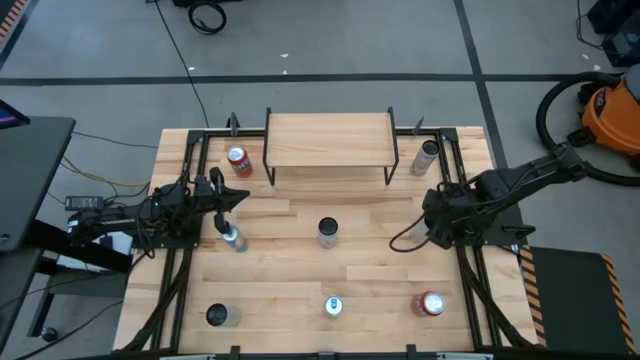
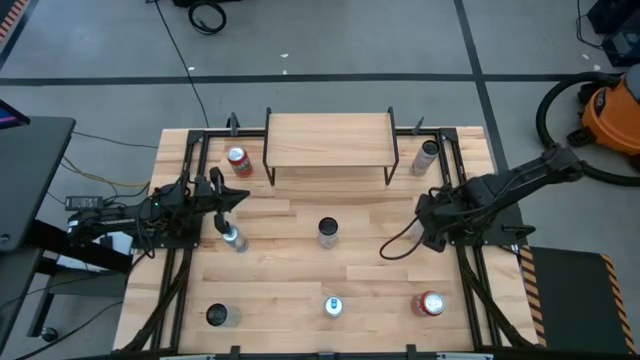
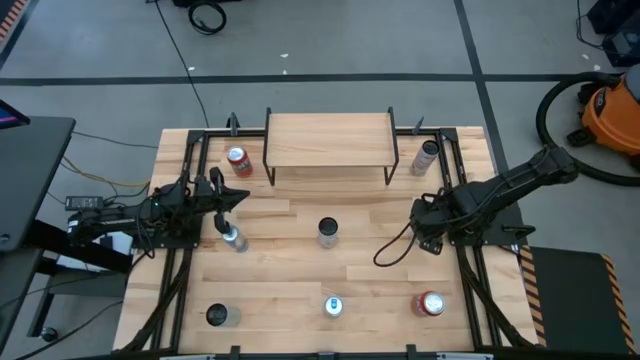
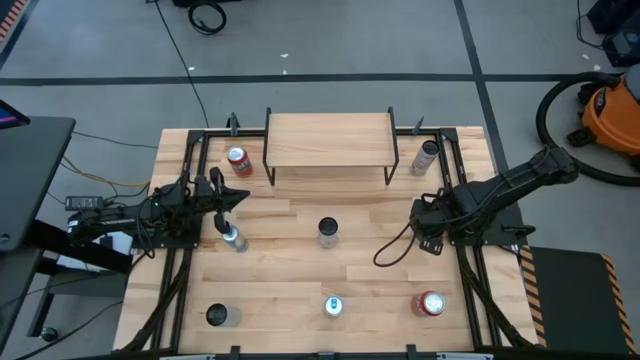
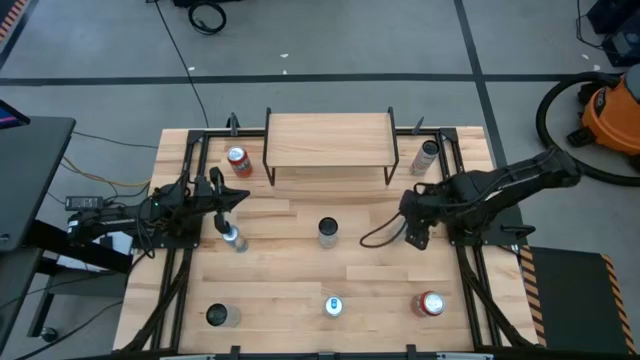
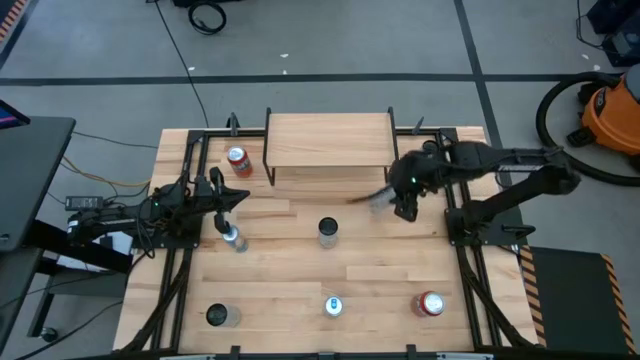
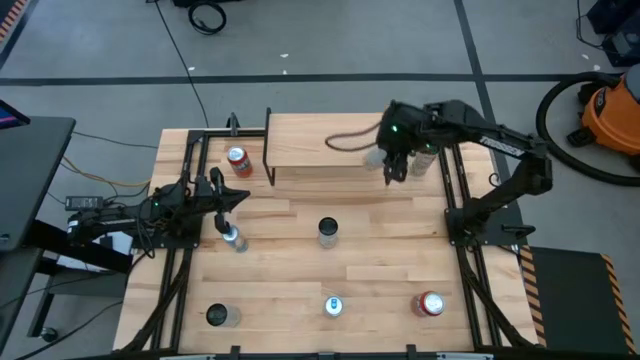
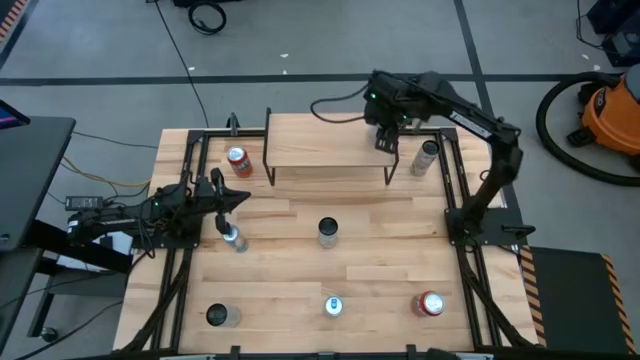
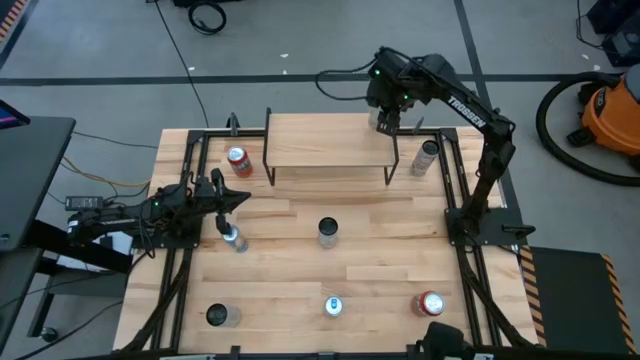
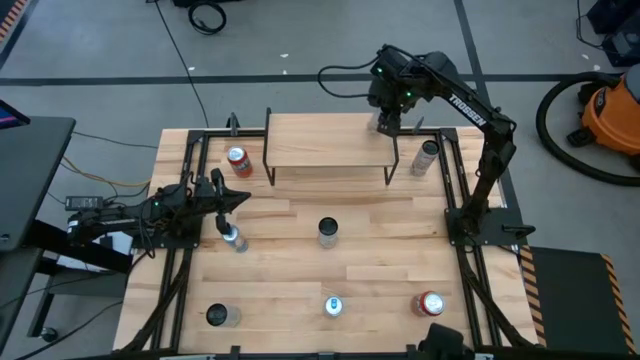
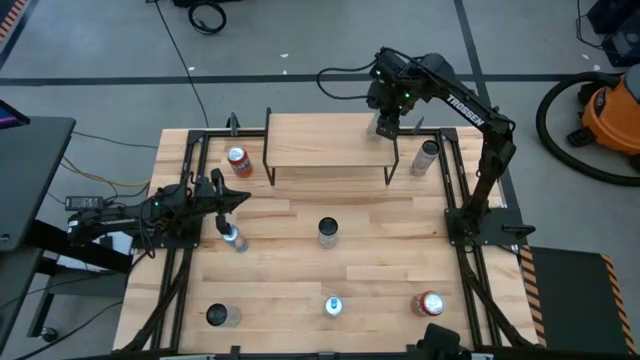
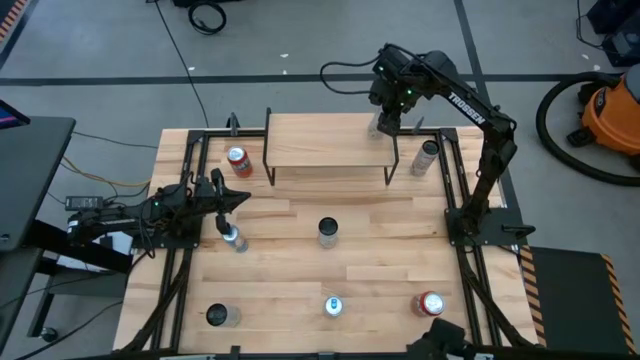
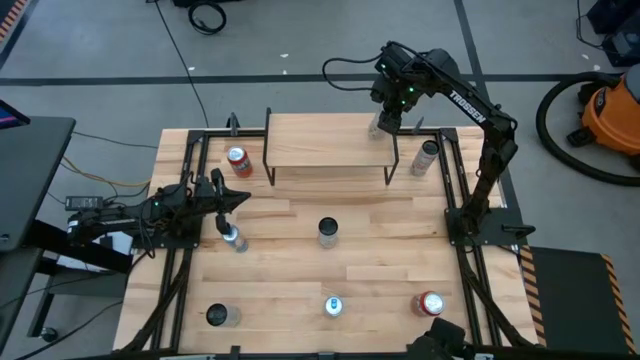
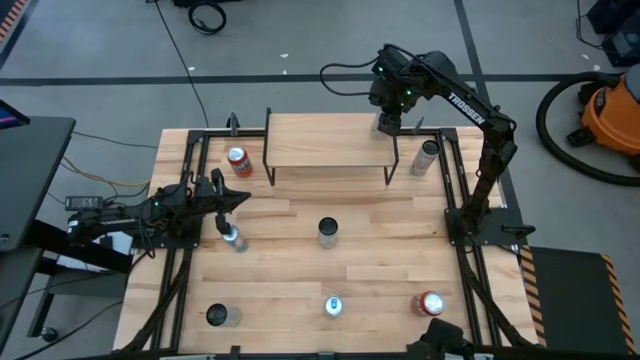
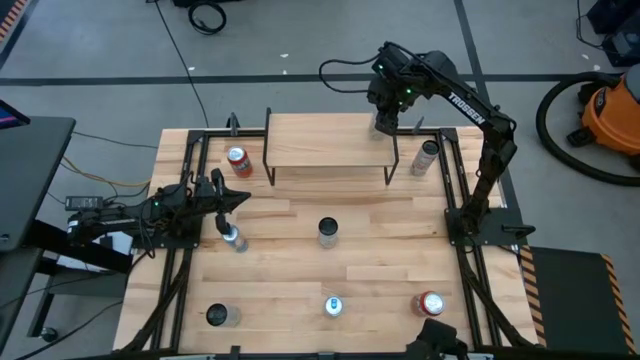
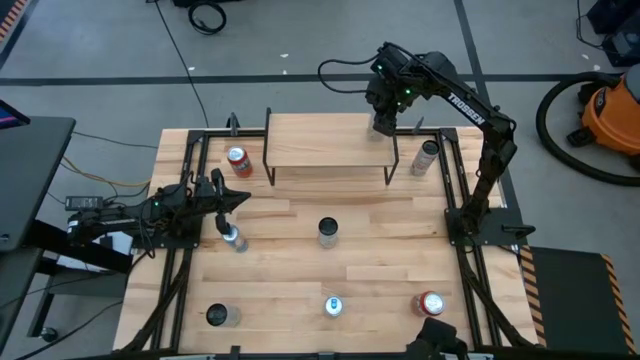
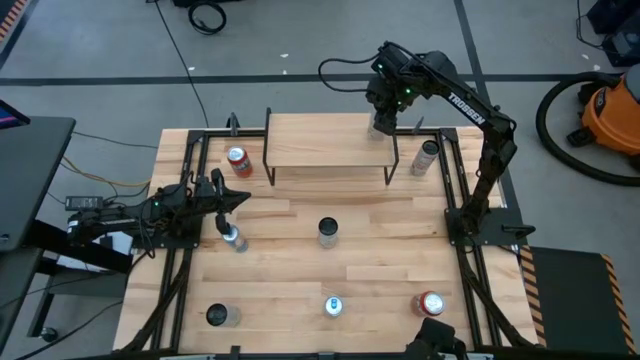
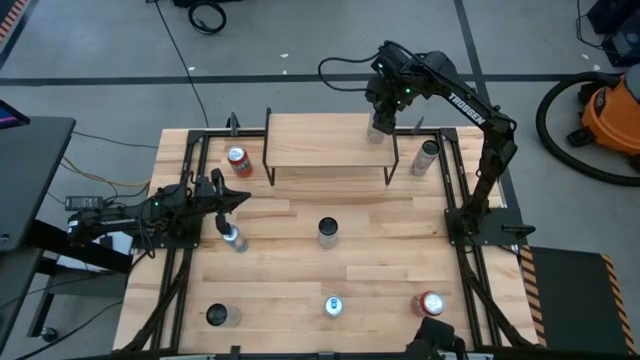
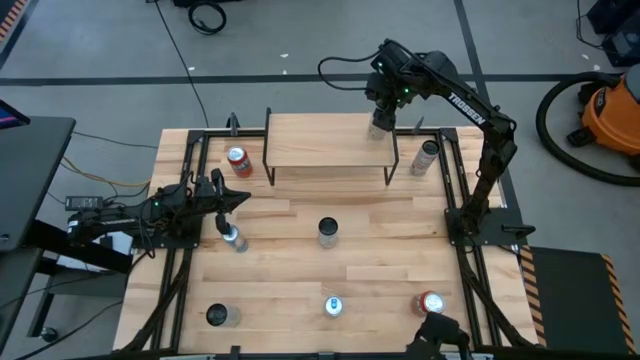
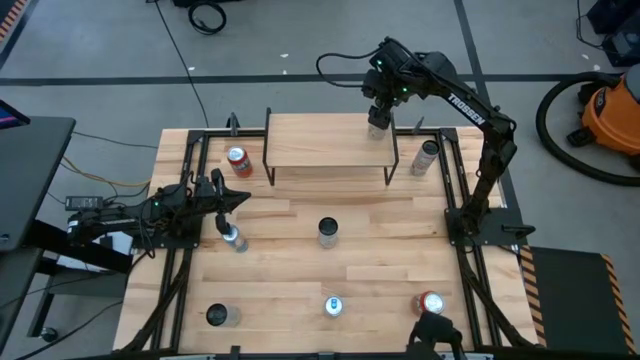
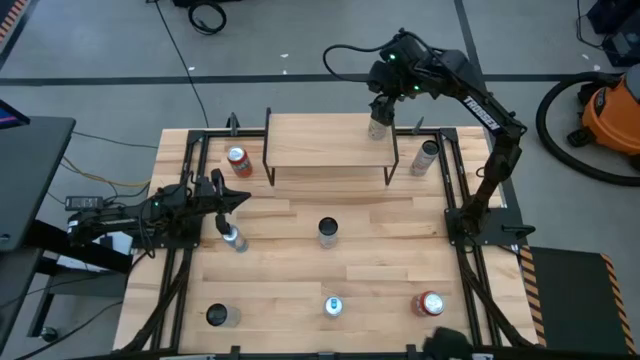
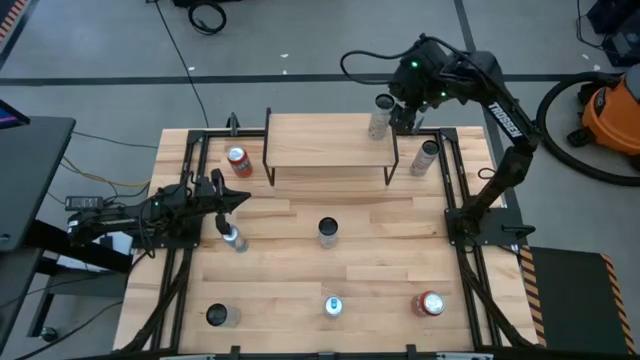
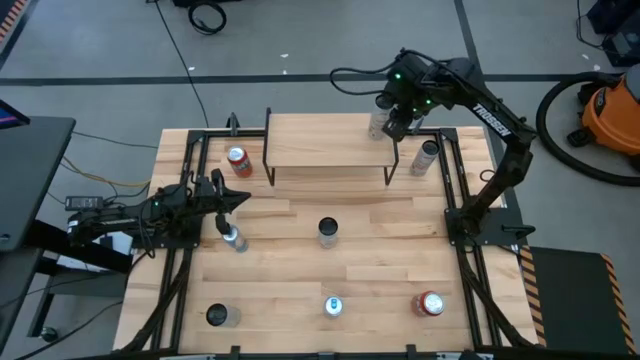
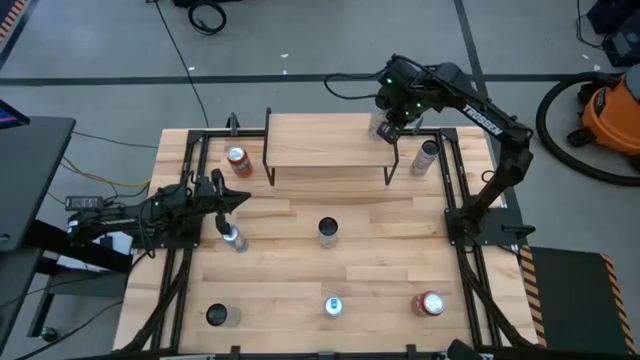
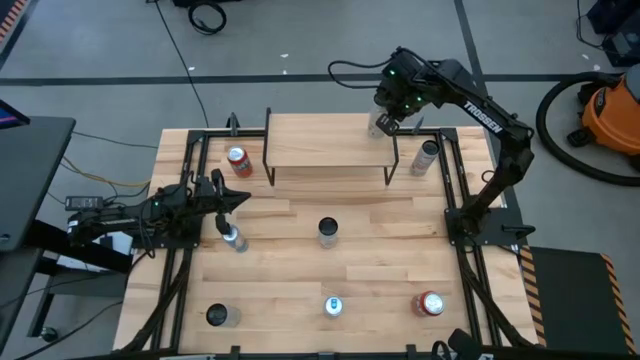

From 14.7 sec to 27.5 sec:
Task: Place canned beverage on shelf
Put the top white yellow soda can on the shelf

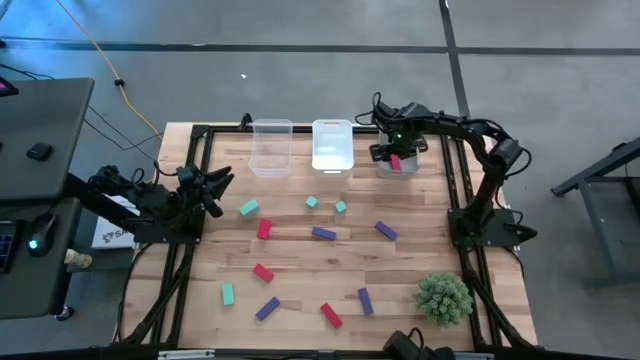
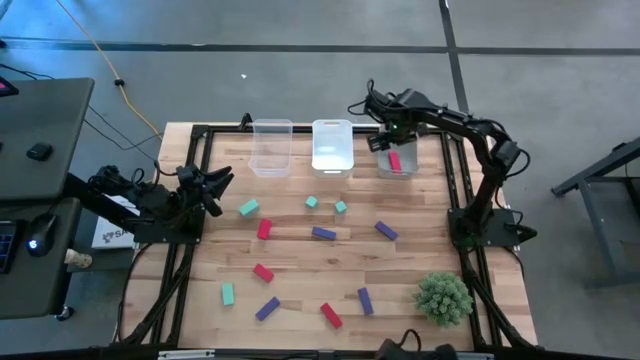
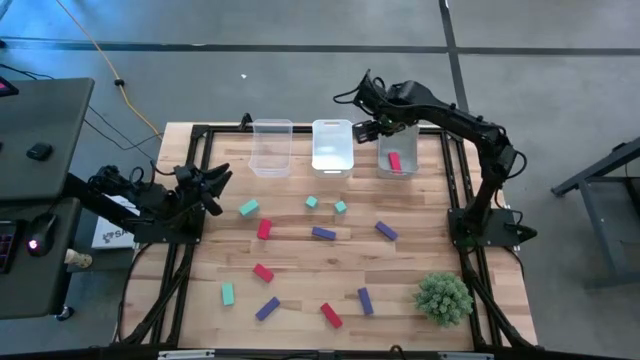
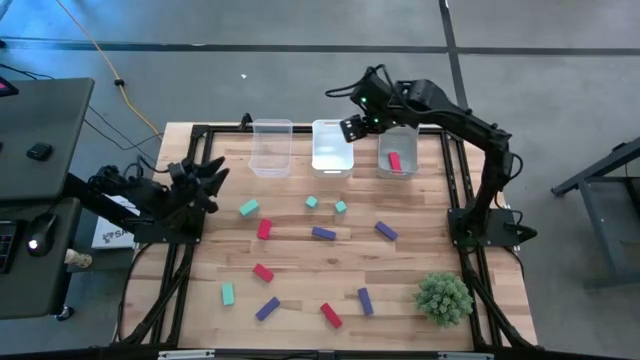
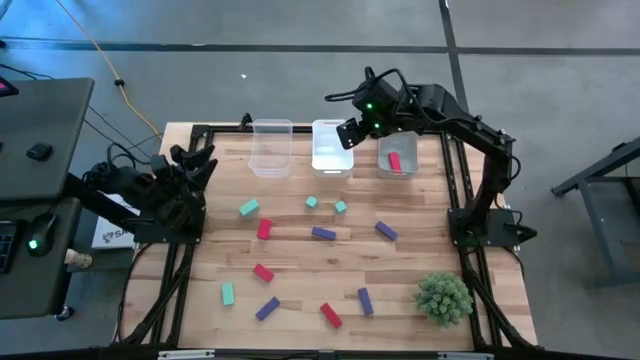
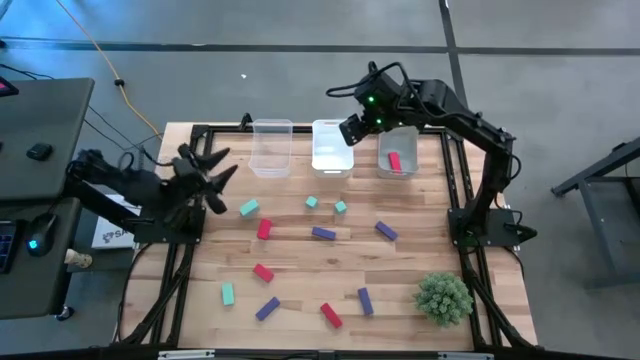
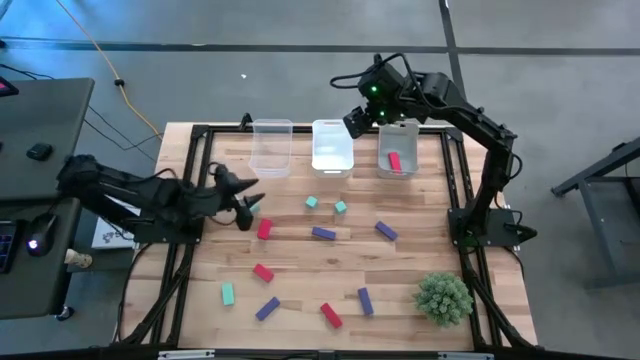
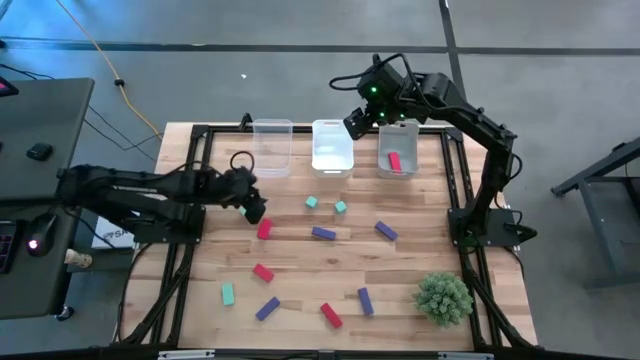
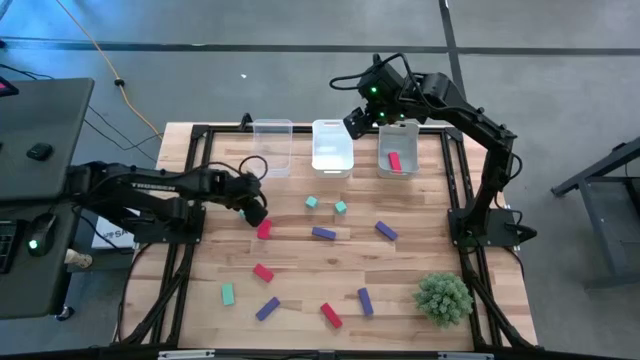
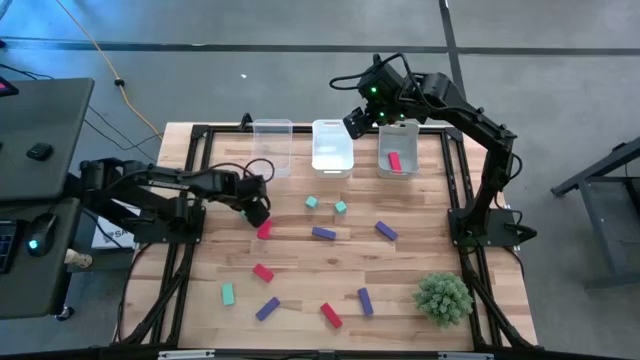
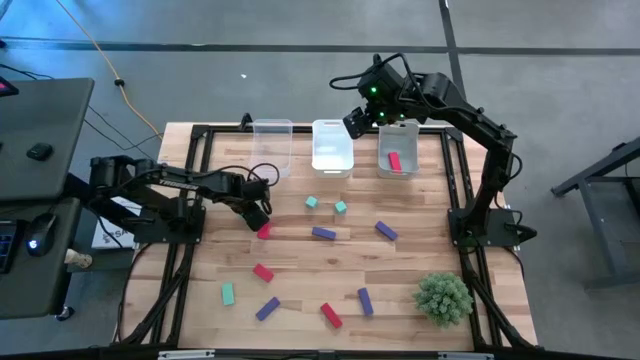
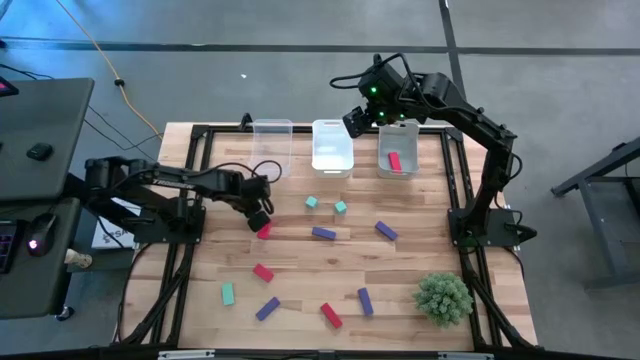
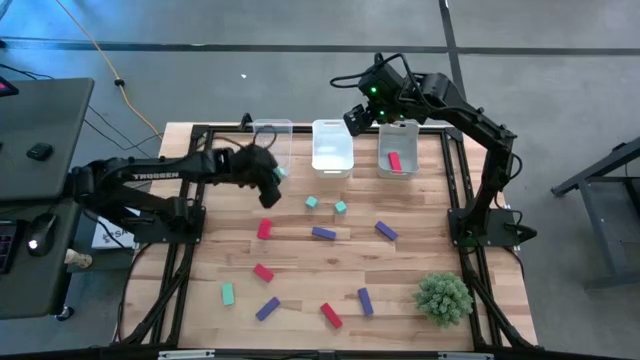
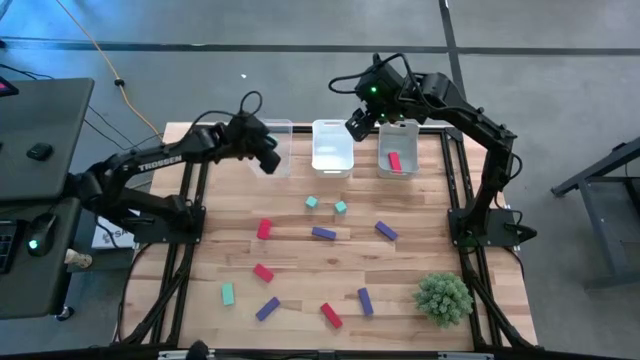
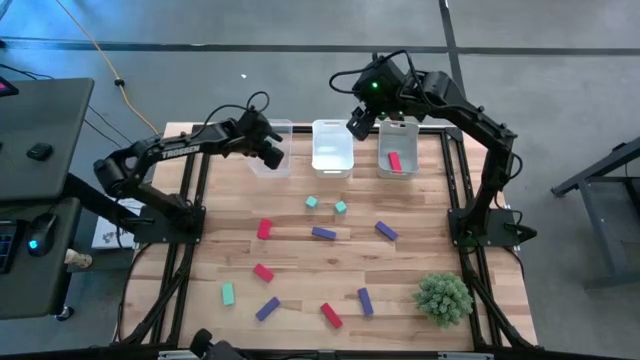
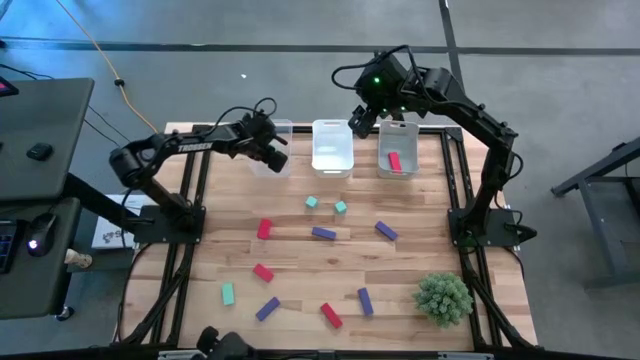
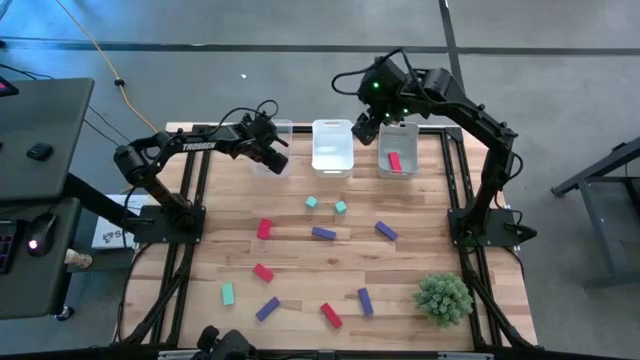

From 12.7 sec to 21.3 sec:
Task: Sort & place blocks by color
Put the light blue block into the transparent bin
